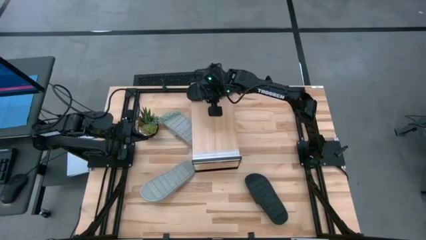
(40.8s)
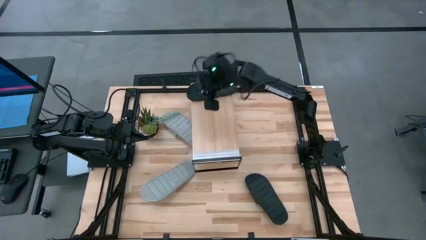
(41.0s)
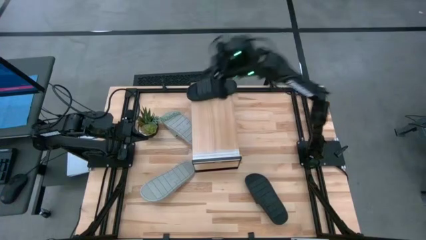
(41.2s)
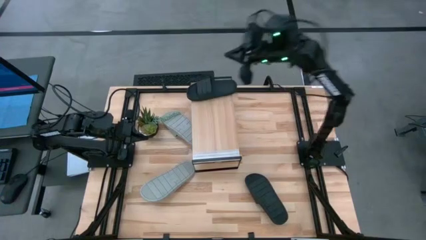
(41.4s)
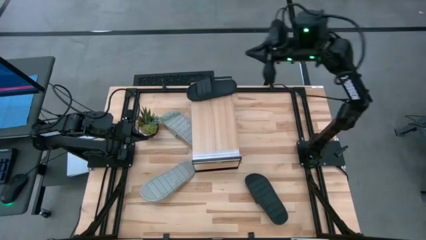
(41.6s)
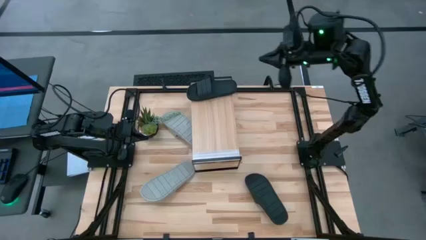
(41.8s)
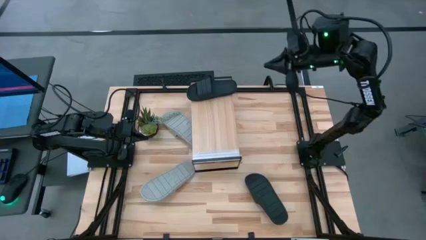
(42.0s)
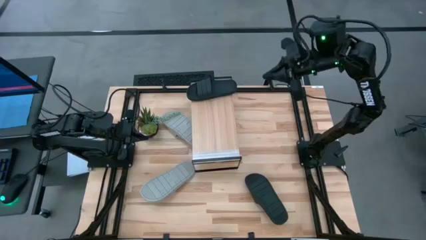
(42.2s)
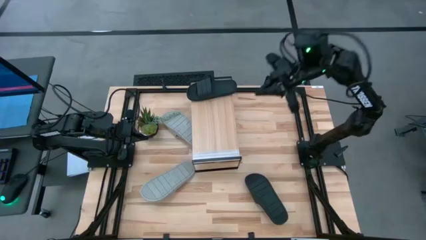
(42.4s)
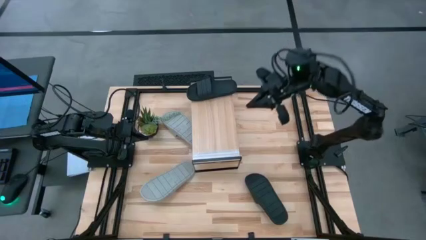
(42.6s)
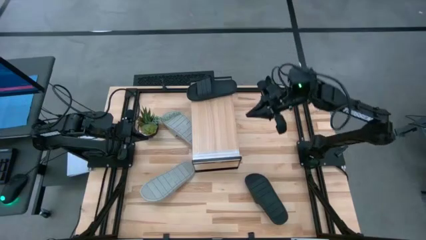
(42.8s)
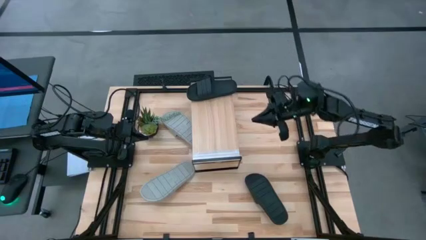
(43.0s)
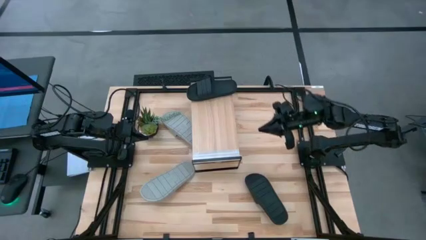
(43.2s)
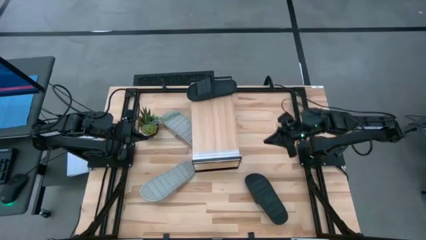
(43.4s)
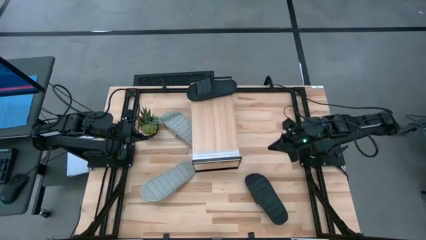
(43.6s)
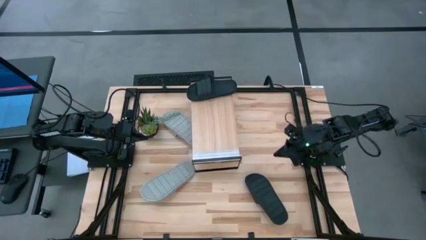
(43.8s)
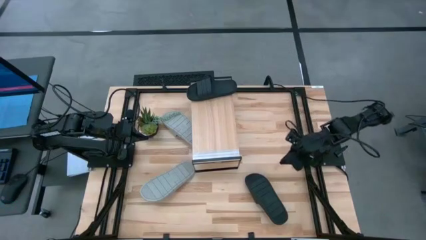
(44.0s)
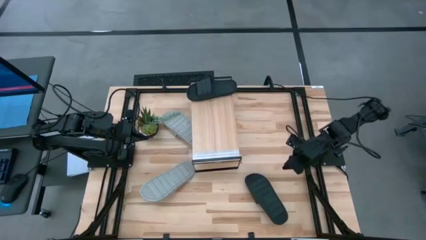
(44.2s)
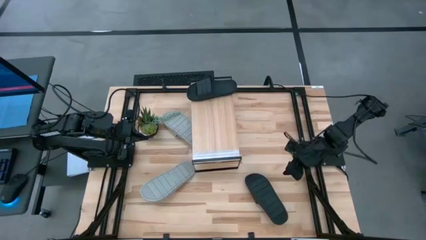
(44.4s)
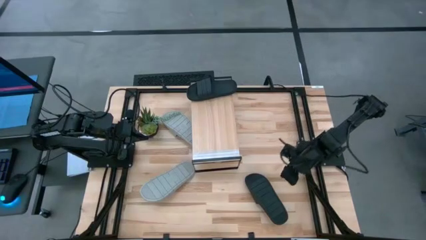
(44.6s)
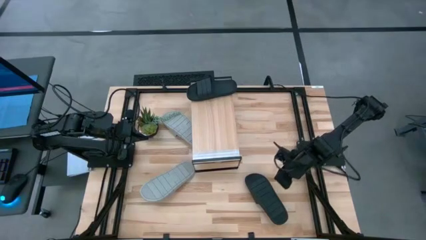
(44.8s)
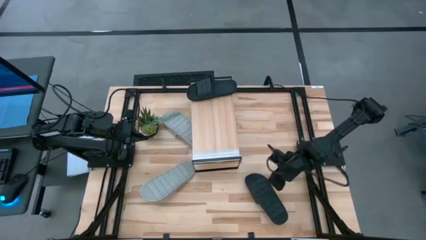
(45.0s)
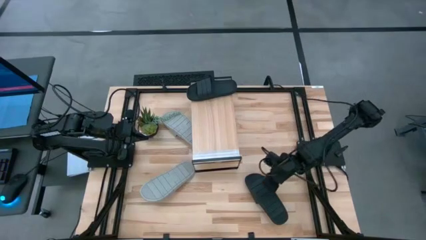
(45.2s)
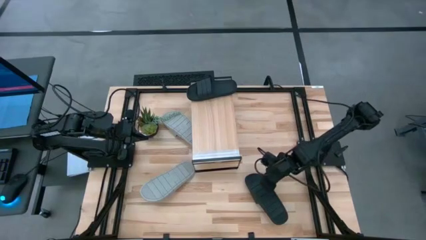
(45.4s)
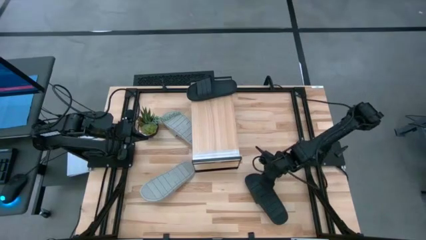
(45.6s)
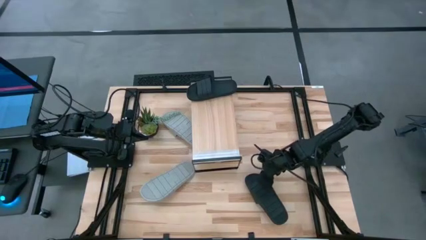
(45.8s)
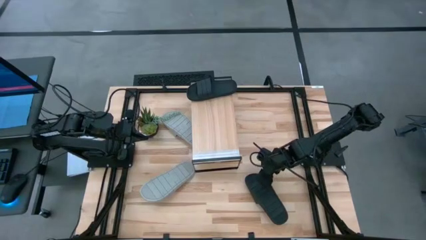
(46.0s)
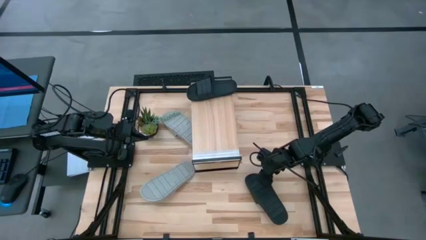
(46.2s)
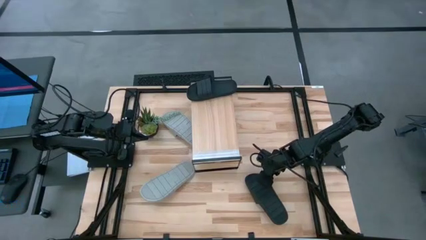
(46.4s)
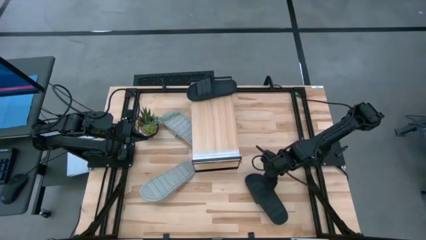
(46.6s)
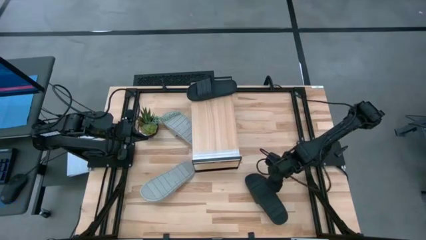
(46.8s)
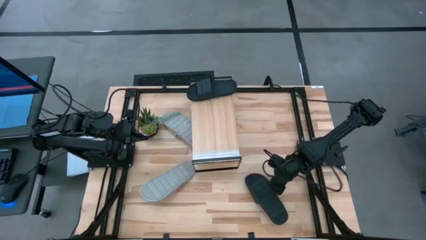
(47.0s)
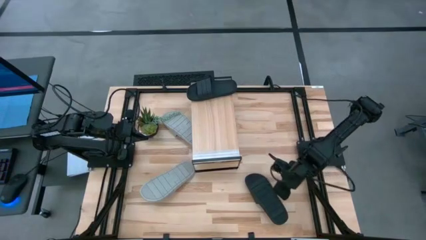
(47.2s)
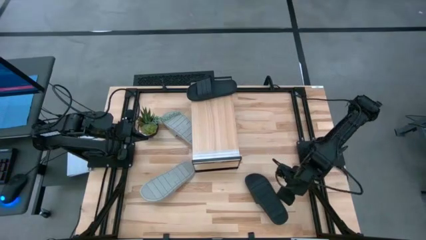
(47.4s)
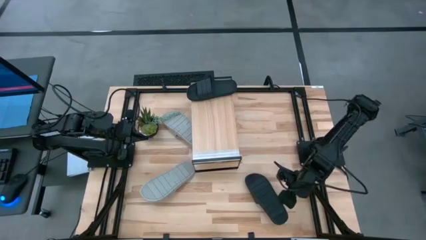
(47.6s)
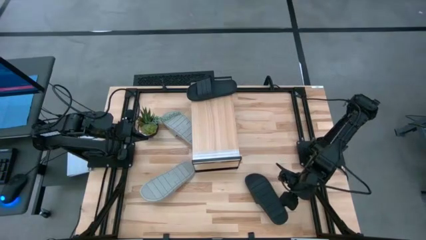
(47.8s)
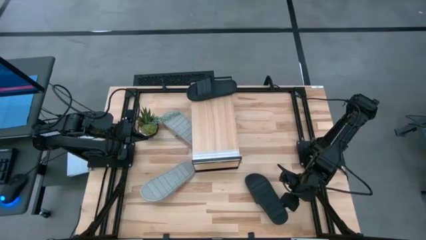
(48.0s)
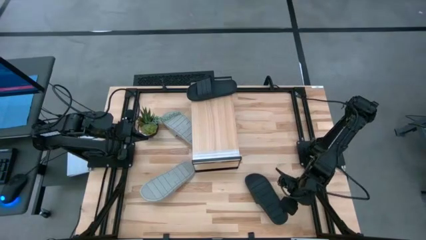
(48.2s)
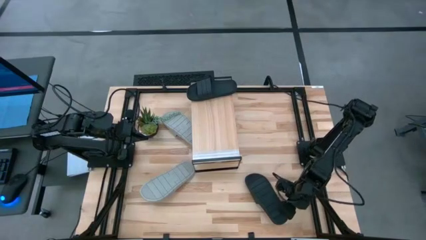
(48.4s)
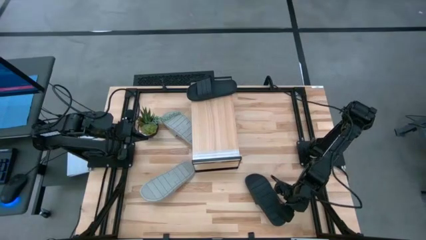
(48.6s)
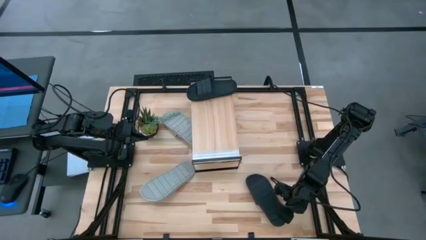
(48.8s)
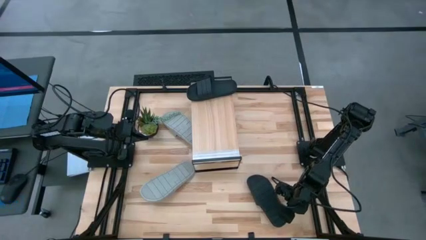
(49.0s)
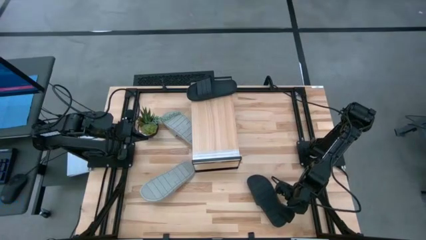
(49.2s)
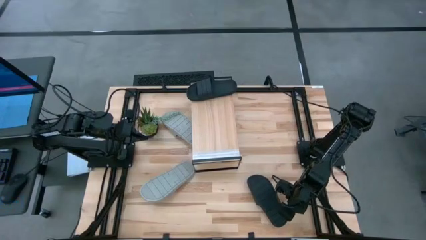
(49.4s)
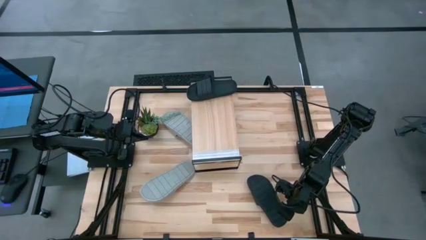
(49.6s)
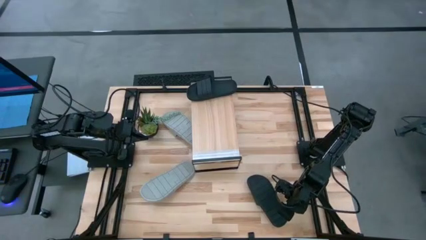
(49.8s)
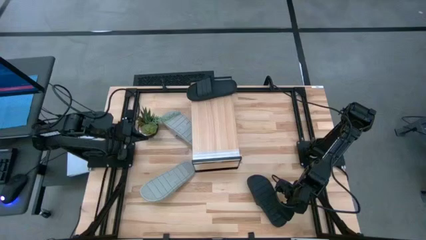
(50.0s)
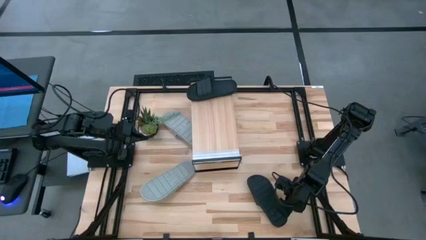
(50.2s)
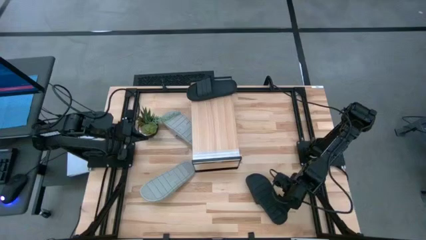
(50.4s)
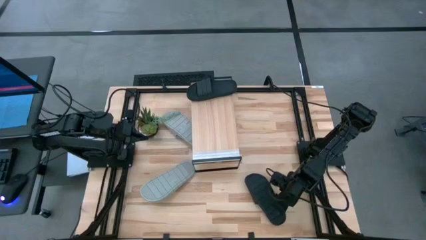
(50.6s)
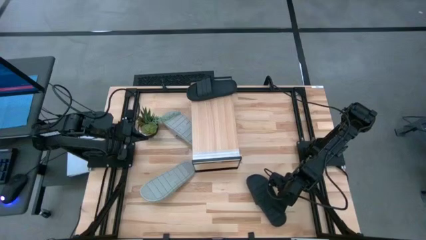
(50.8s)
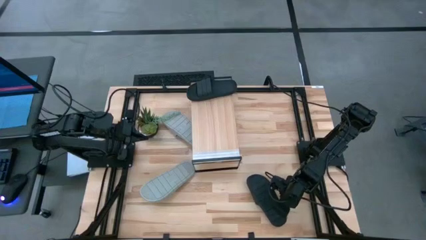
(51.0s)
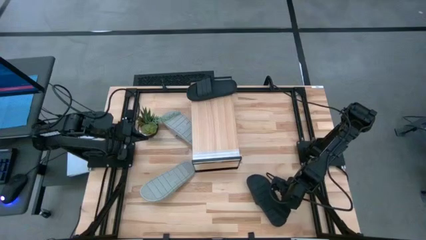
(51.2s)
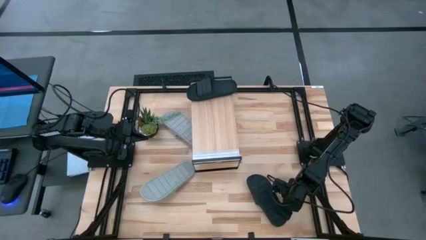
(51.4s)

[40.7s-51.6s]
Task: Pick and place slides into the shelf
Put the black slide on the shelf
